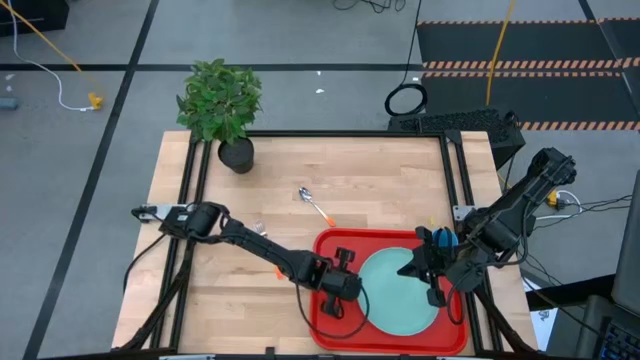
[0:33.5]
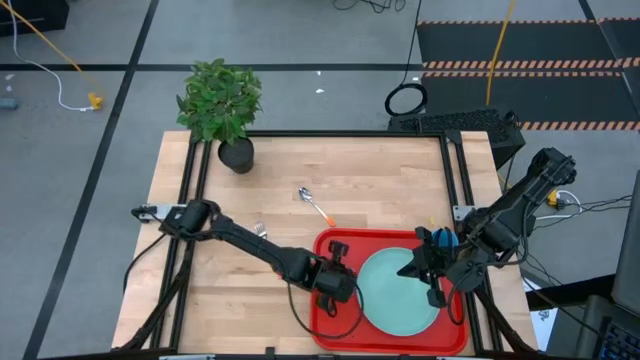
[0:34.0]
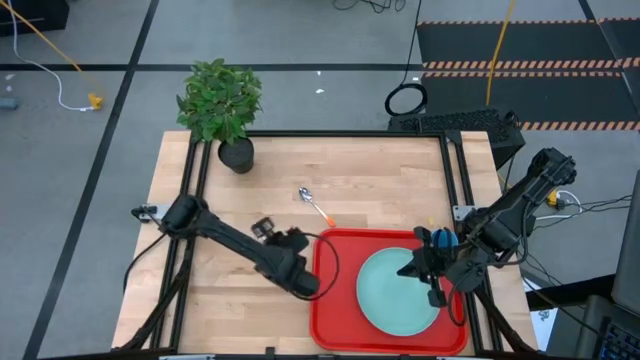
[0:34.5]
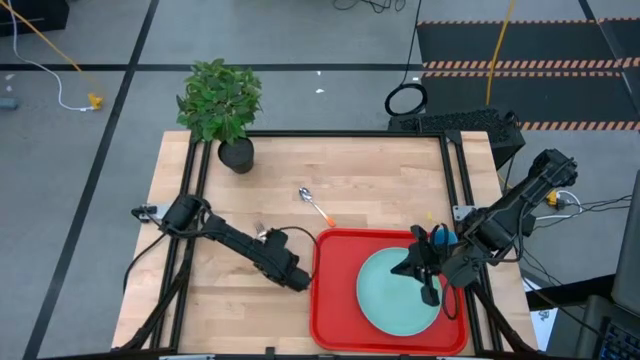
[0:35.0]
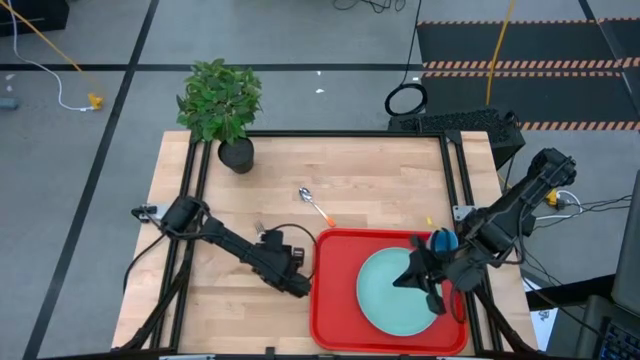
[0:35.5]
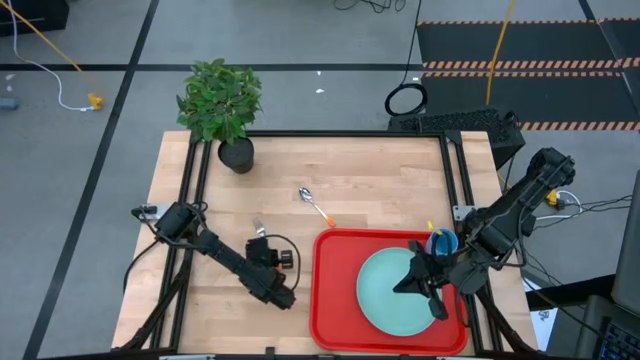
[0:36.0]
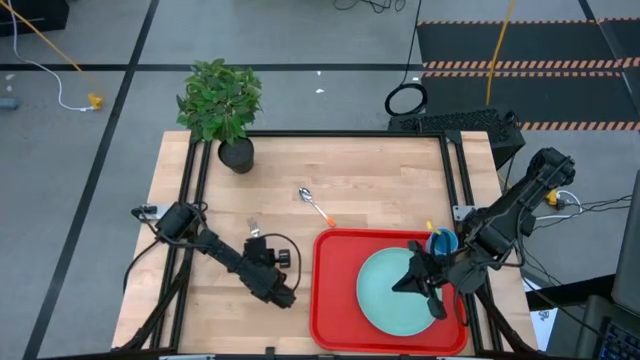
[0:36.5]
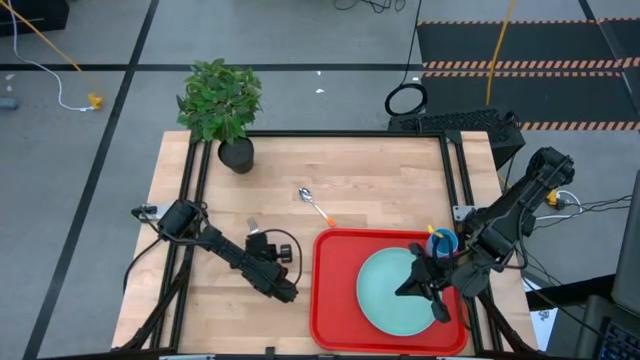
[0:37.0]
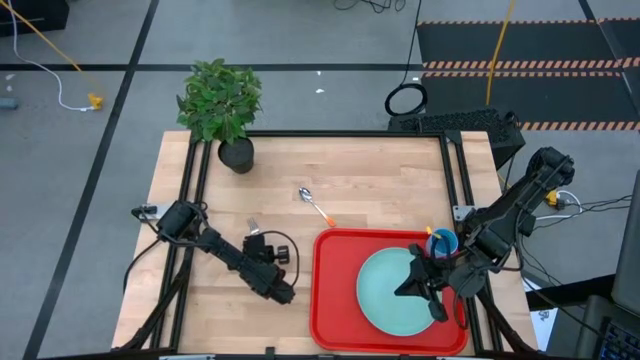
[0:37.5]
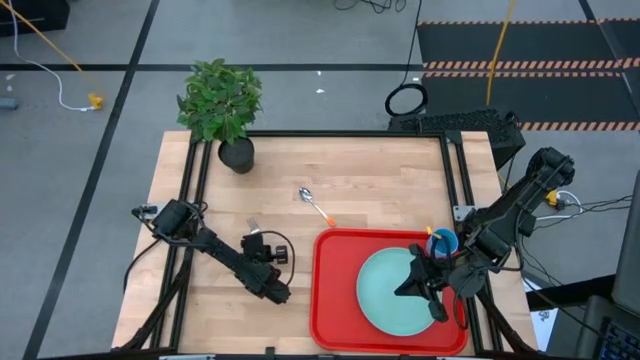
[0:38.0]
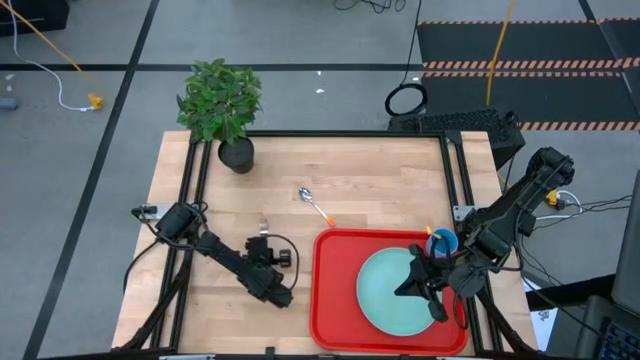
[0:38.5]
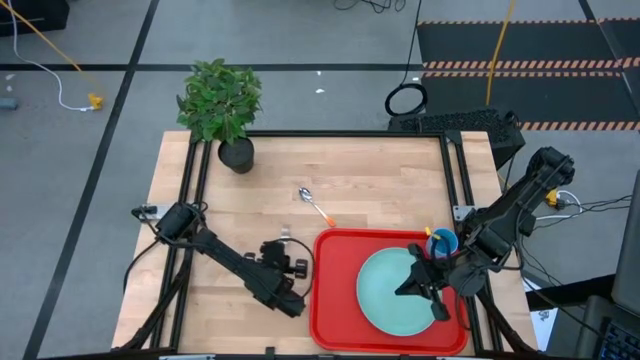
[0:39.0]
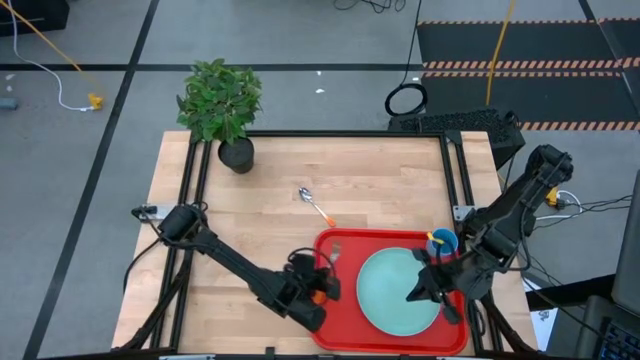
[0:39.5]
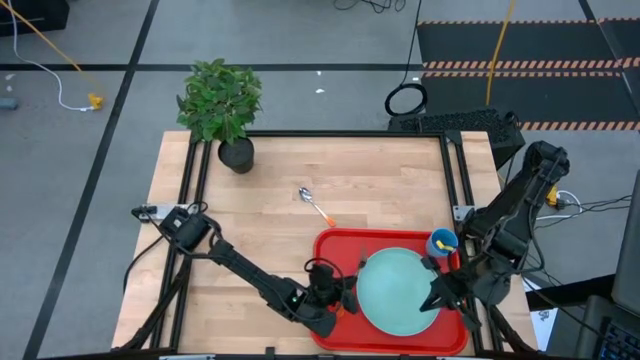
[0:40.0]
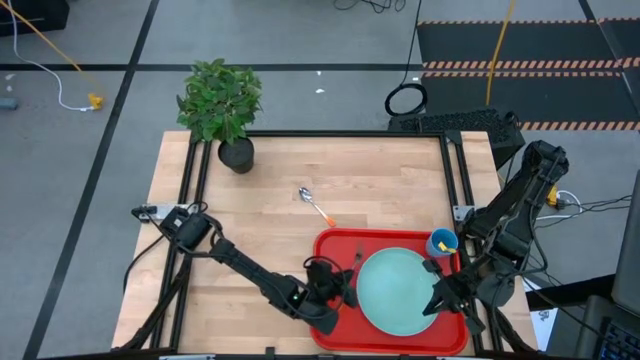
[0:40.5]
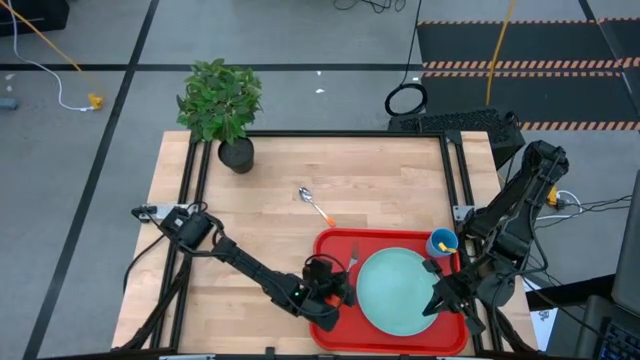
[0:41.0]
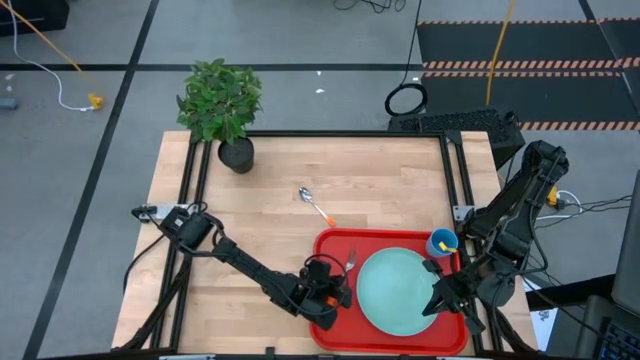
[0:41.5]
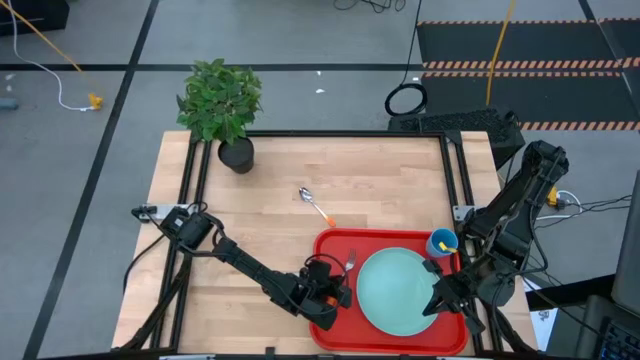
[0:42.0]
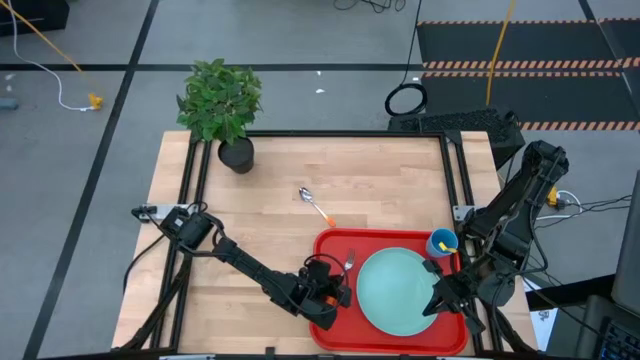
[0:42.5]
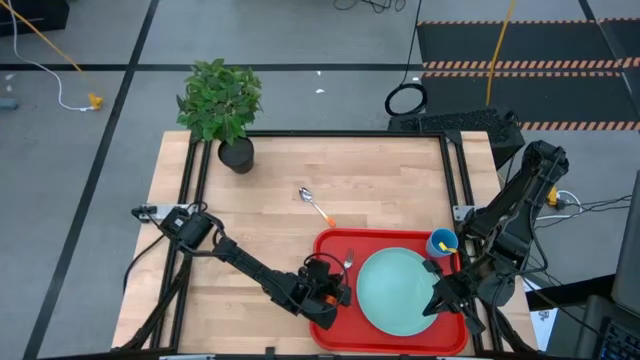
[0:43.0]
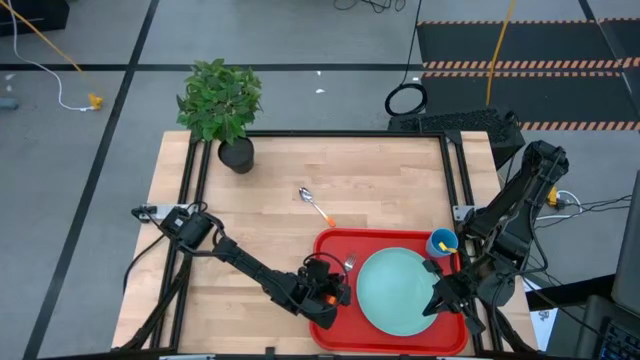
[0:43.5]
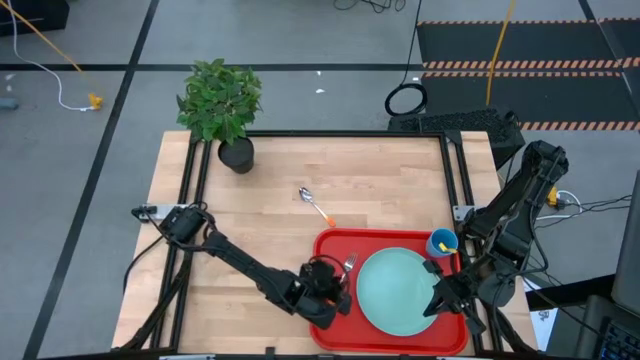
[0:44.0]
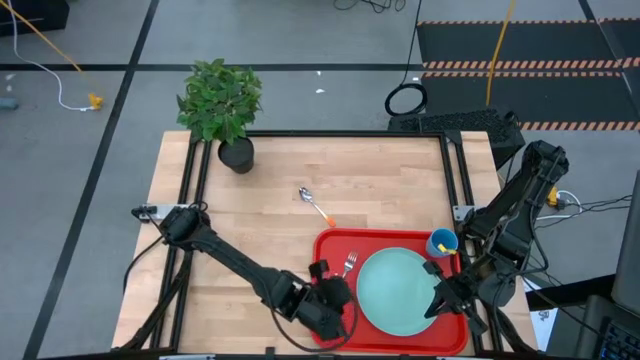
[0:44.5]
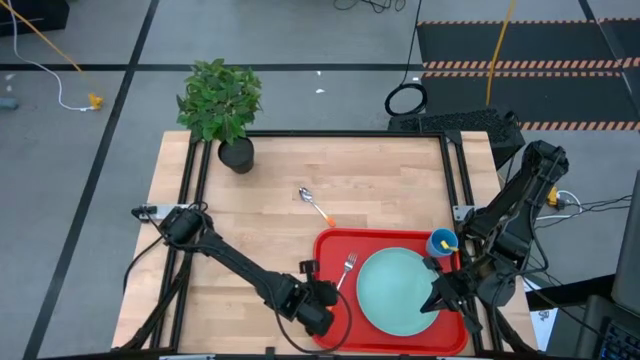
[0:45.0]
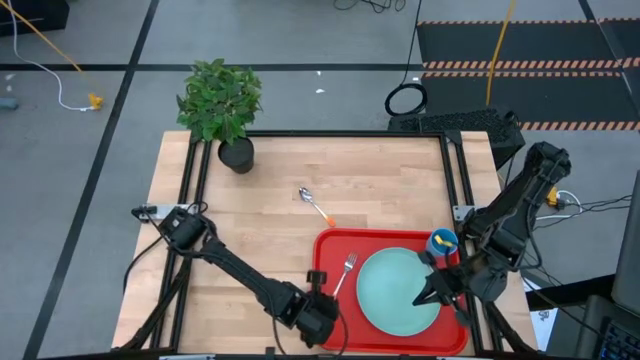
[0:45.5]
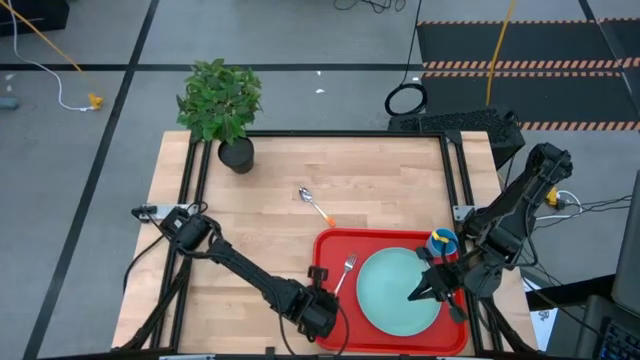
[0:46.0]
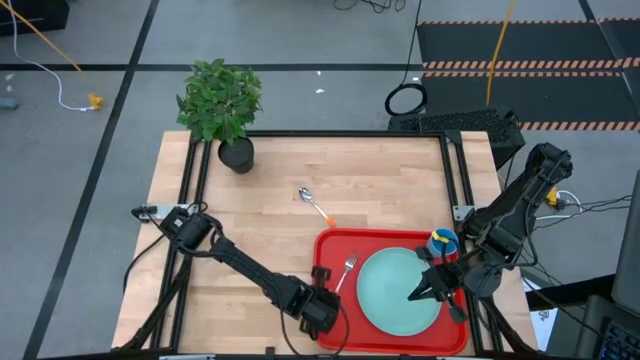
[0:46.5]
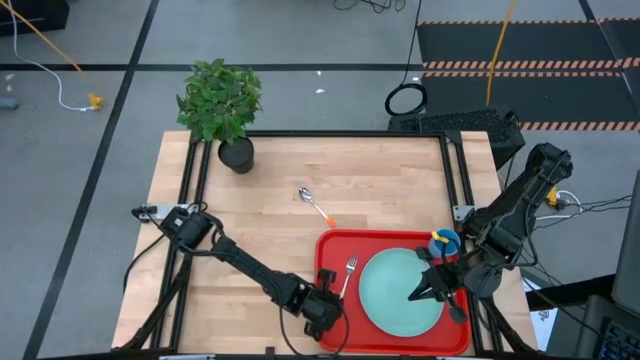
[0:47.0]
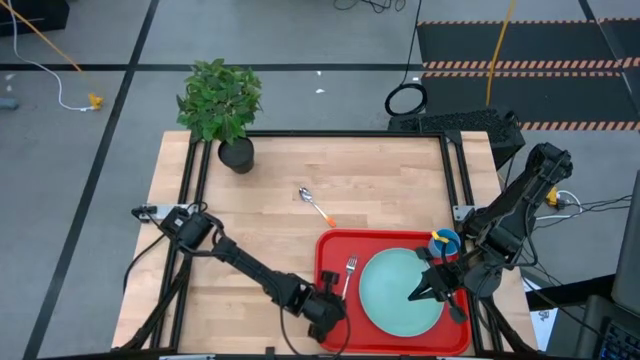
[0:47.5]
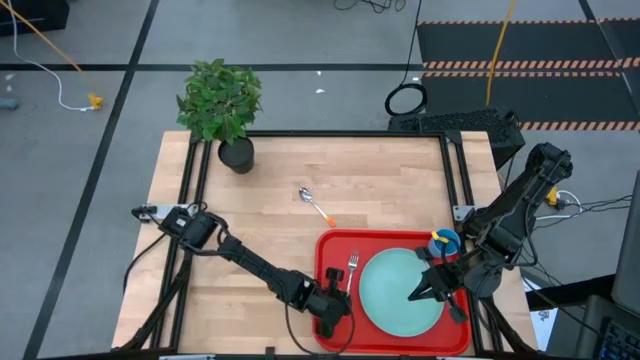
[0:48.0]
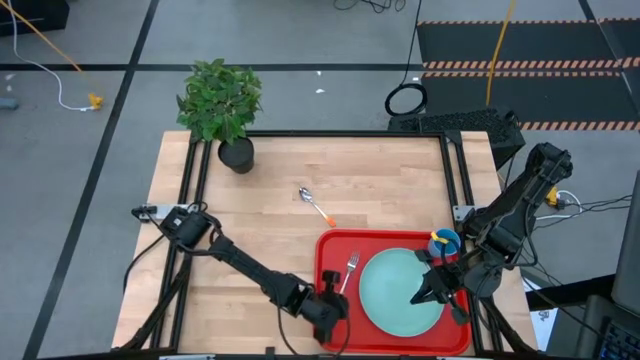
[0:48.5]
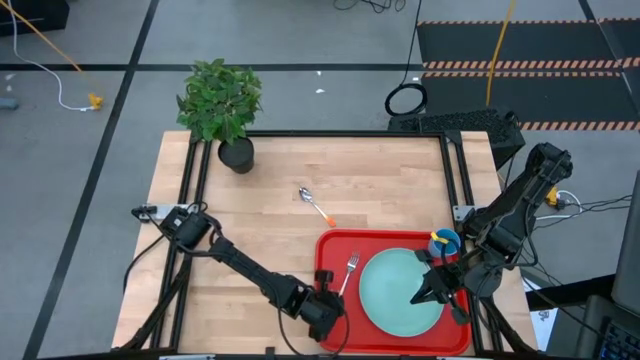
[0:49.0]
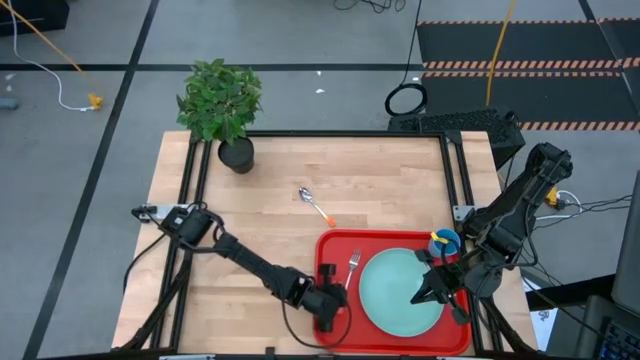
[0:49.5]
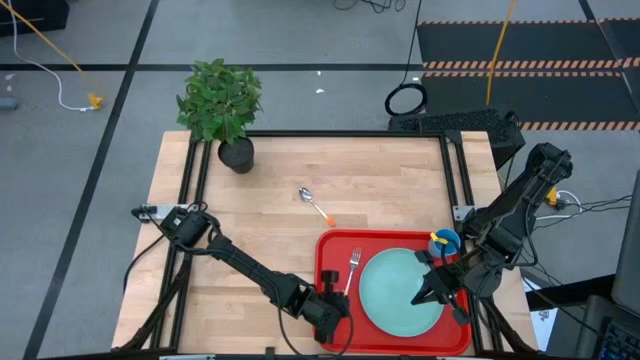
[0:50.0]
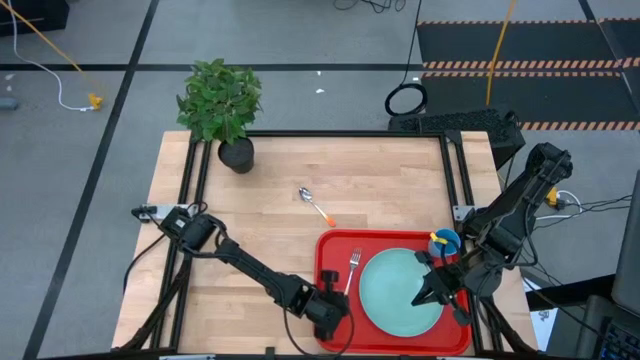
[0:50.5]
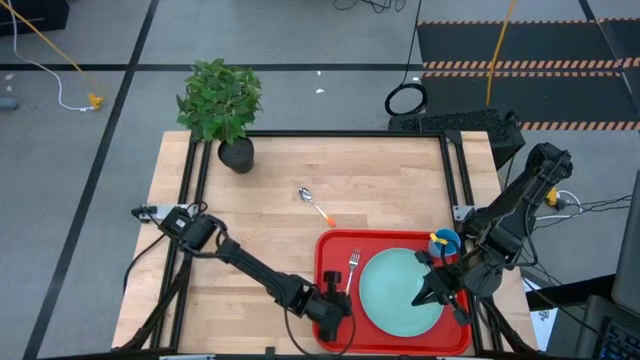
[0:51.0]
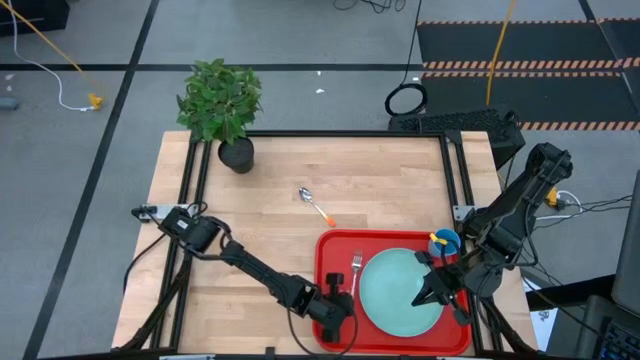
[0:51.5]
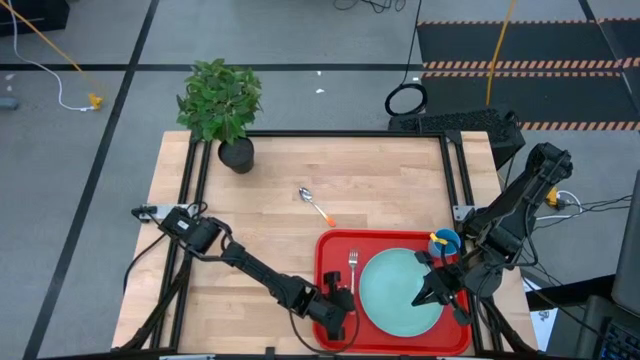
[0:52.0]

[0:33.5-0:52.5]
Task: Pick and place plate/cup/fork/spoon on tray
Put the orange fork on the left side of the light blue plate on the red serving tray
